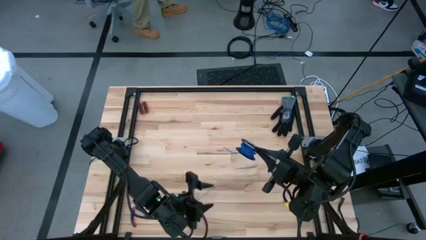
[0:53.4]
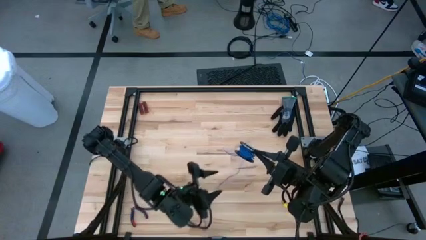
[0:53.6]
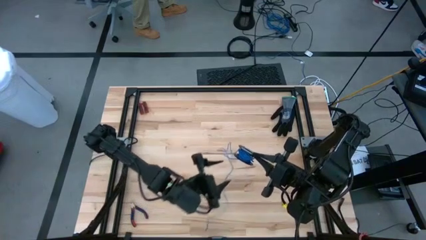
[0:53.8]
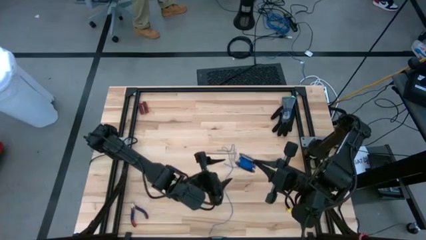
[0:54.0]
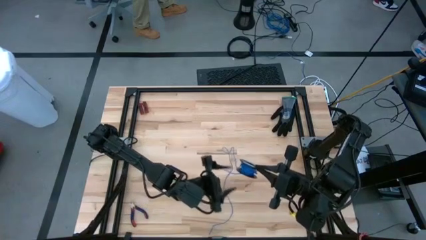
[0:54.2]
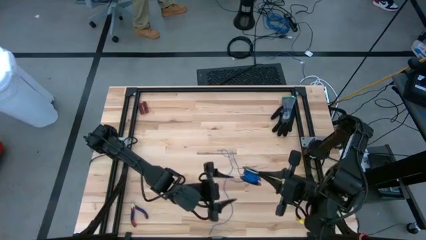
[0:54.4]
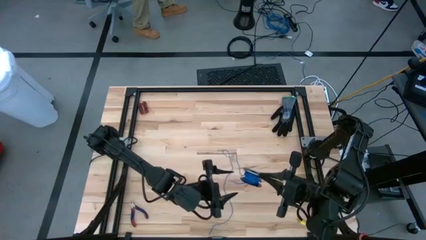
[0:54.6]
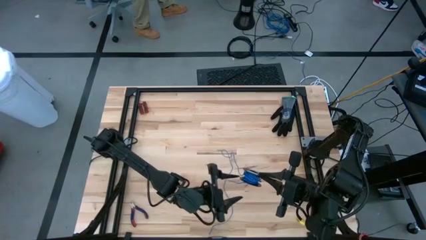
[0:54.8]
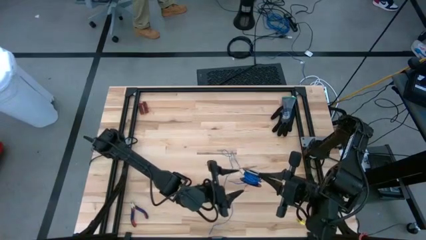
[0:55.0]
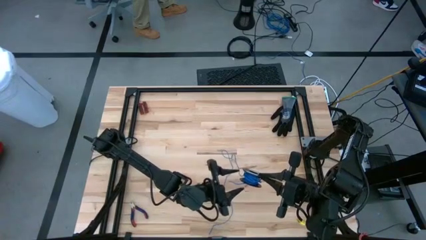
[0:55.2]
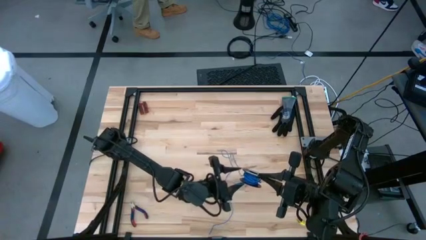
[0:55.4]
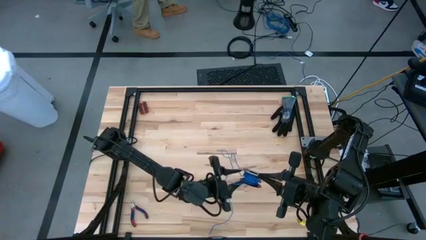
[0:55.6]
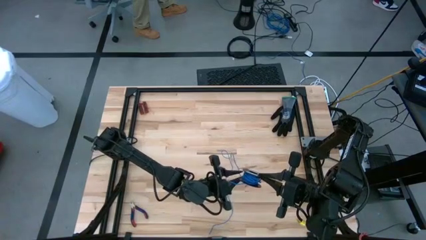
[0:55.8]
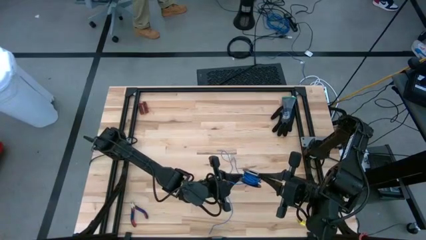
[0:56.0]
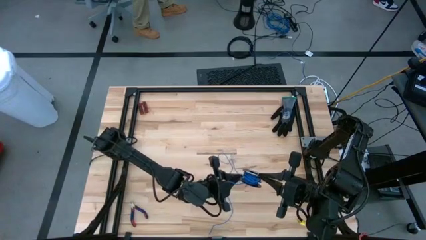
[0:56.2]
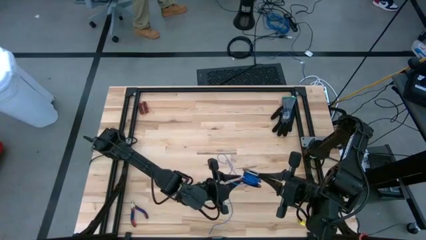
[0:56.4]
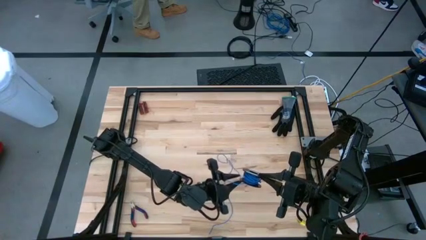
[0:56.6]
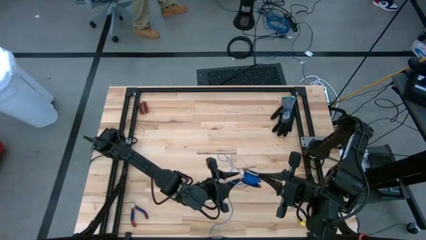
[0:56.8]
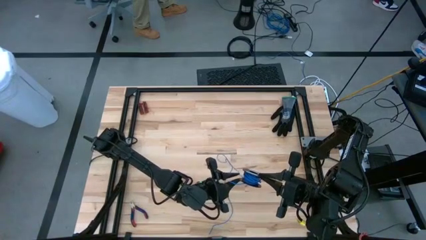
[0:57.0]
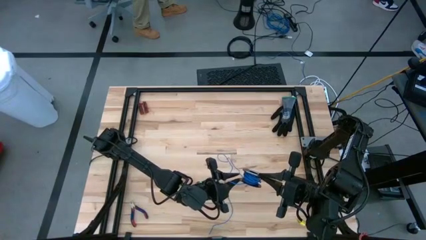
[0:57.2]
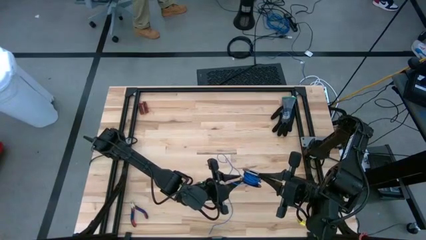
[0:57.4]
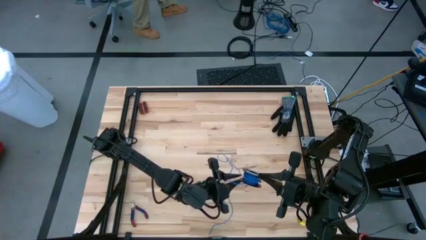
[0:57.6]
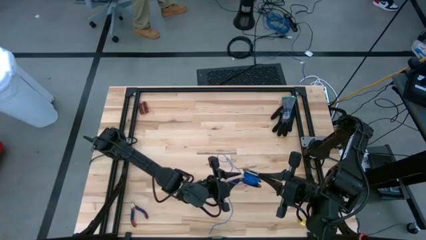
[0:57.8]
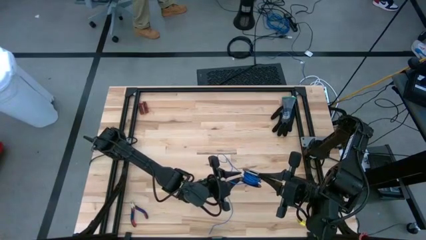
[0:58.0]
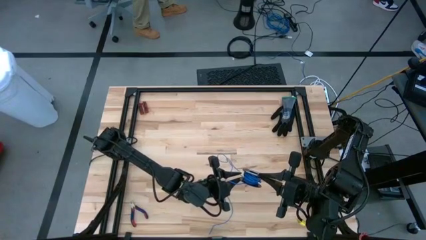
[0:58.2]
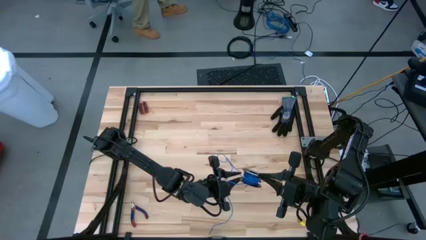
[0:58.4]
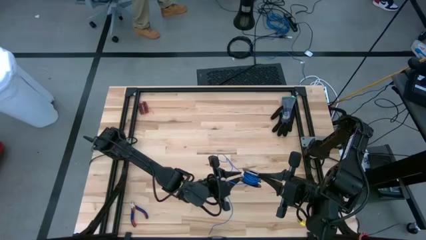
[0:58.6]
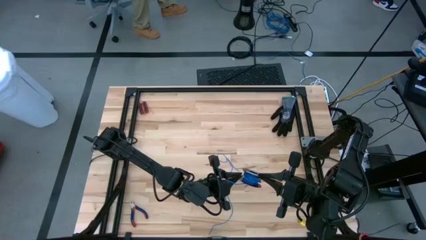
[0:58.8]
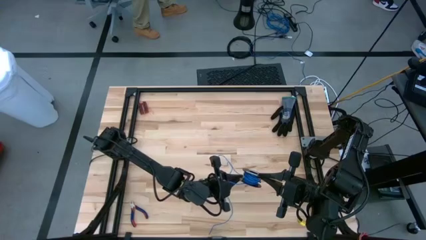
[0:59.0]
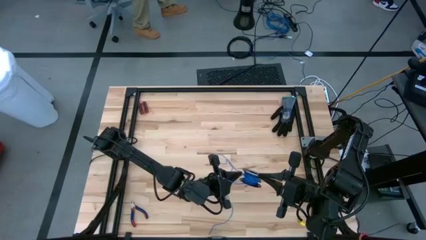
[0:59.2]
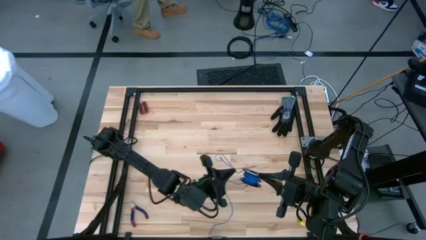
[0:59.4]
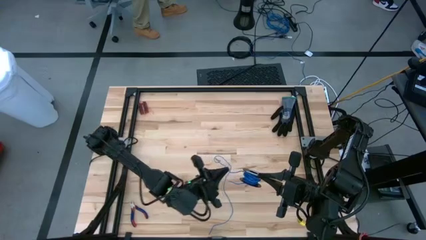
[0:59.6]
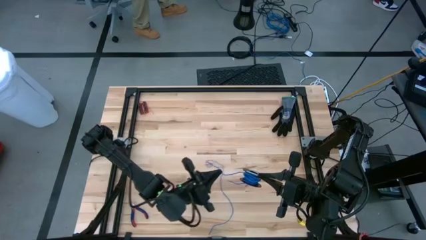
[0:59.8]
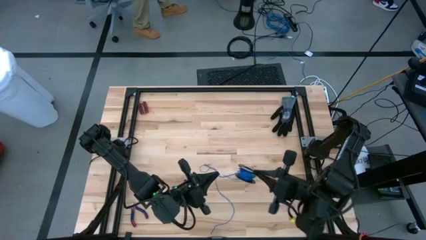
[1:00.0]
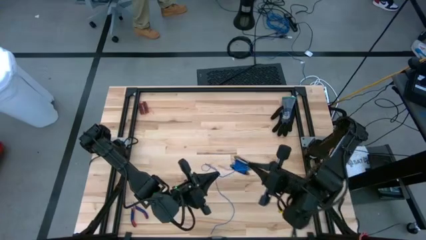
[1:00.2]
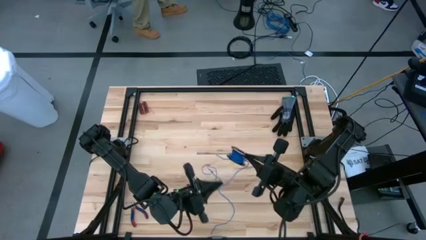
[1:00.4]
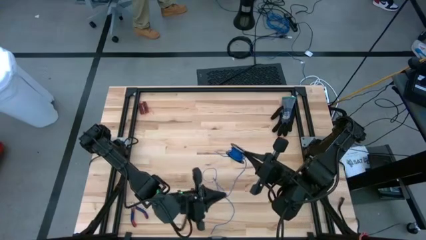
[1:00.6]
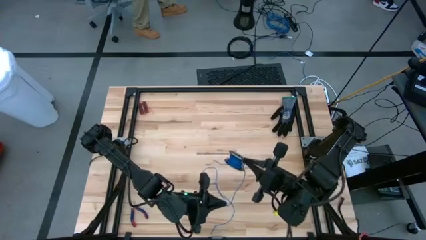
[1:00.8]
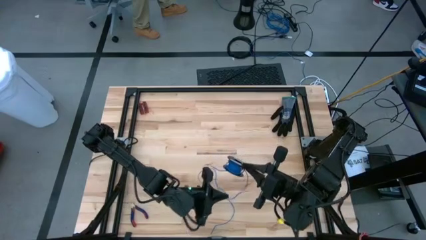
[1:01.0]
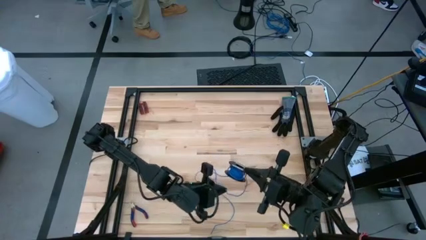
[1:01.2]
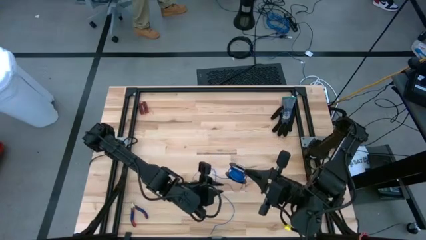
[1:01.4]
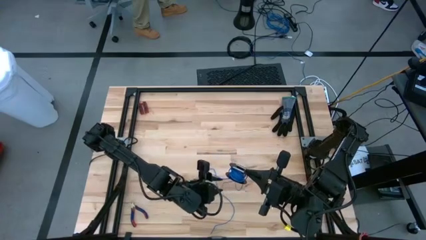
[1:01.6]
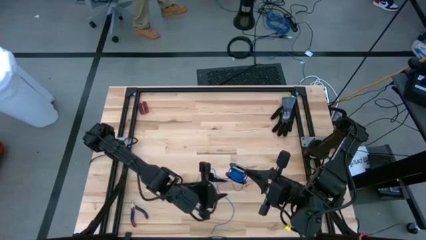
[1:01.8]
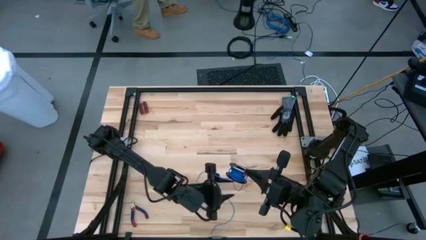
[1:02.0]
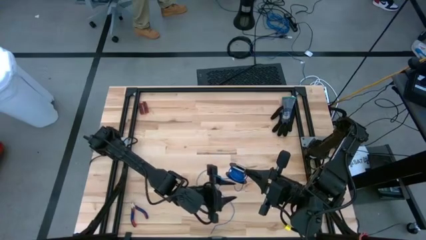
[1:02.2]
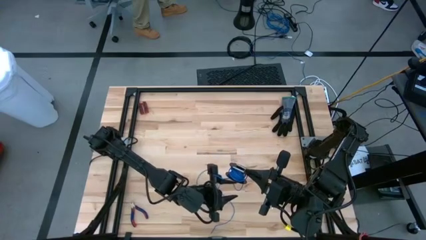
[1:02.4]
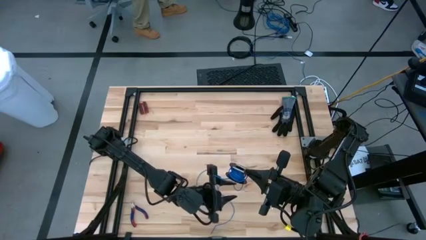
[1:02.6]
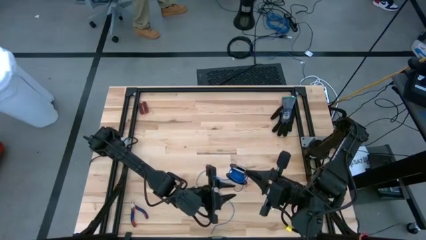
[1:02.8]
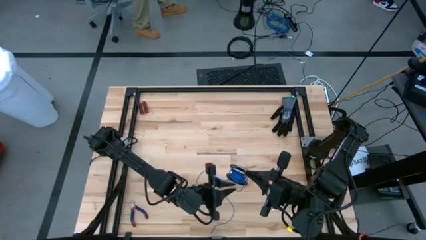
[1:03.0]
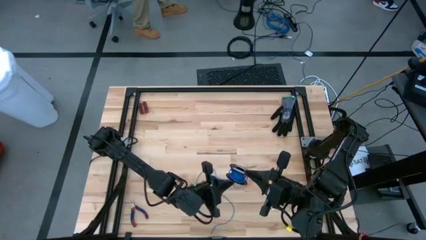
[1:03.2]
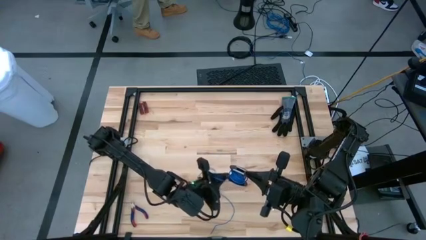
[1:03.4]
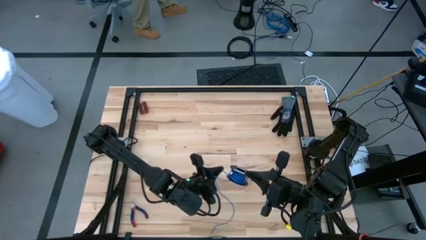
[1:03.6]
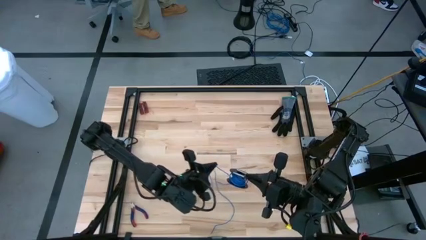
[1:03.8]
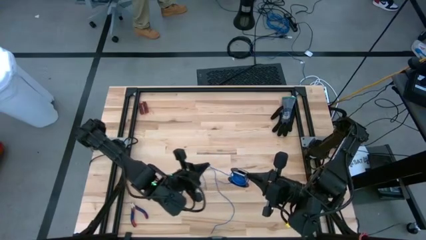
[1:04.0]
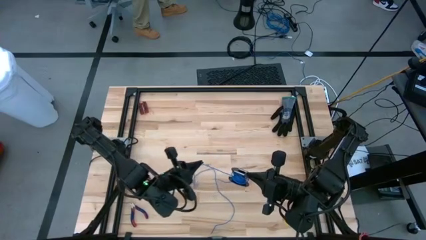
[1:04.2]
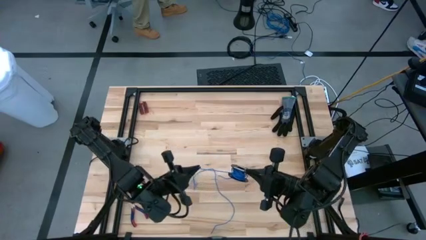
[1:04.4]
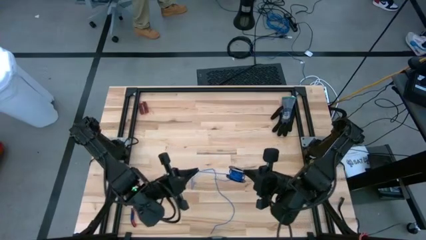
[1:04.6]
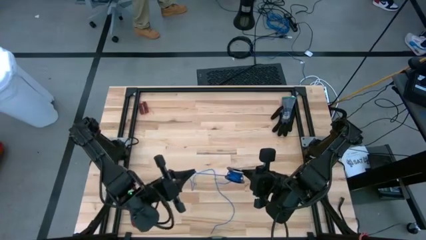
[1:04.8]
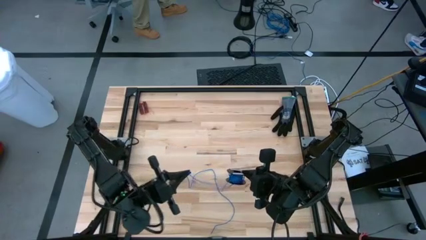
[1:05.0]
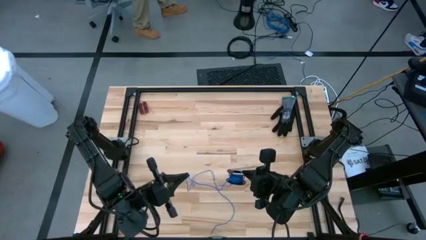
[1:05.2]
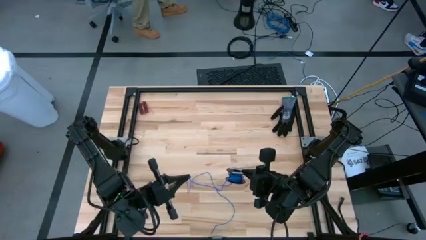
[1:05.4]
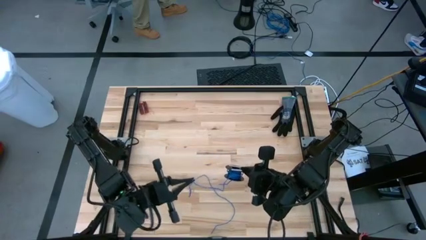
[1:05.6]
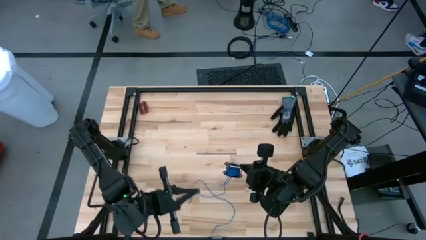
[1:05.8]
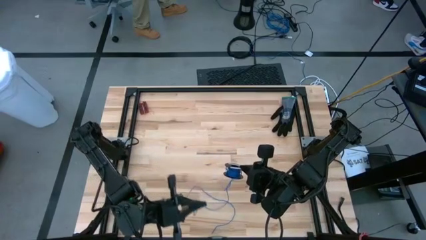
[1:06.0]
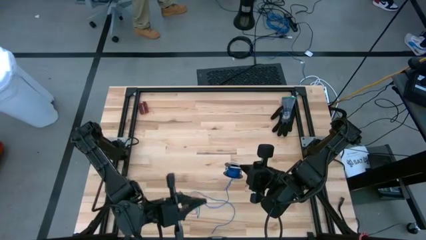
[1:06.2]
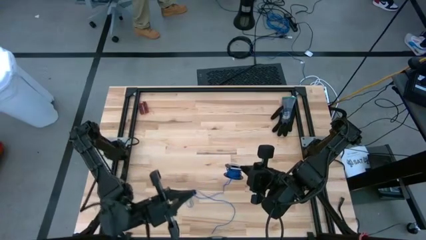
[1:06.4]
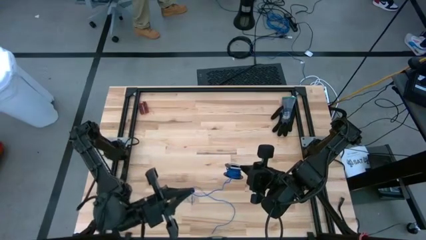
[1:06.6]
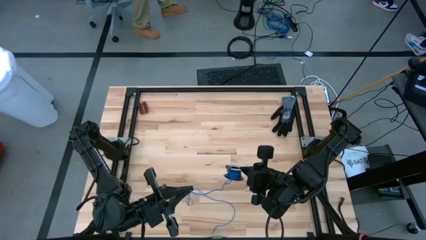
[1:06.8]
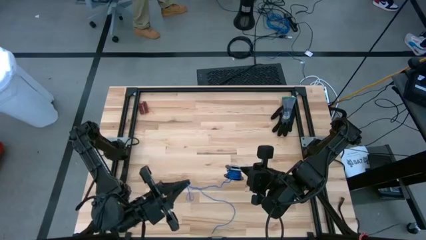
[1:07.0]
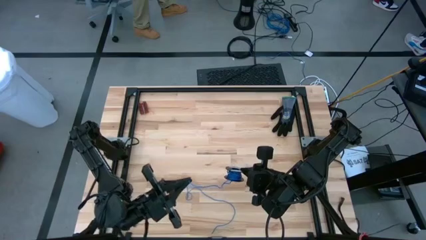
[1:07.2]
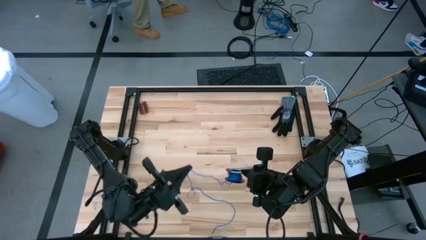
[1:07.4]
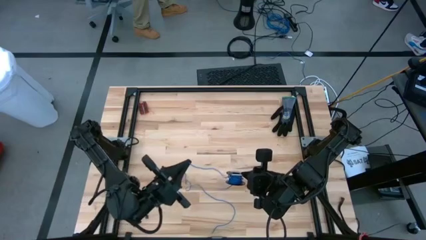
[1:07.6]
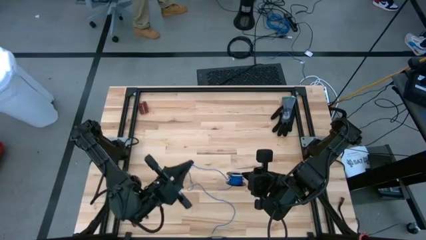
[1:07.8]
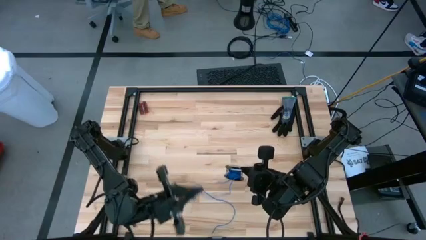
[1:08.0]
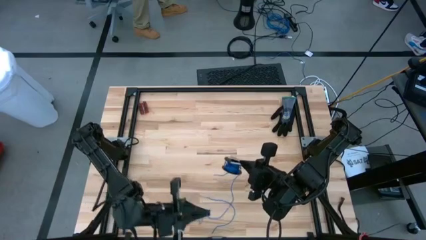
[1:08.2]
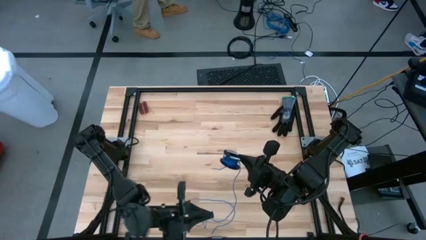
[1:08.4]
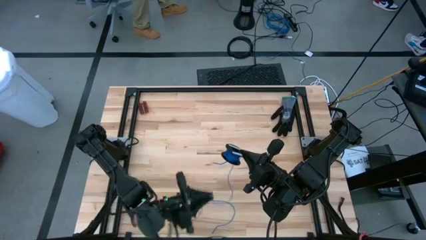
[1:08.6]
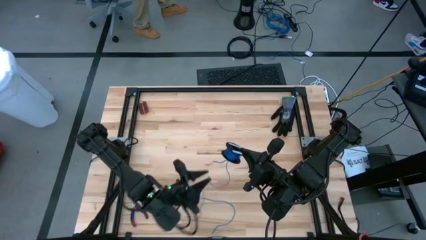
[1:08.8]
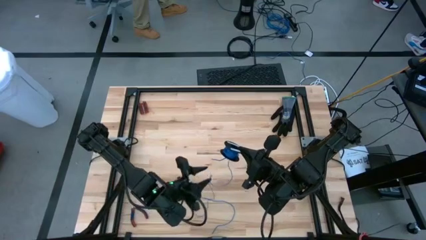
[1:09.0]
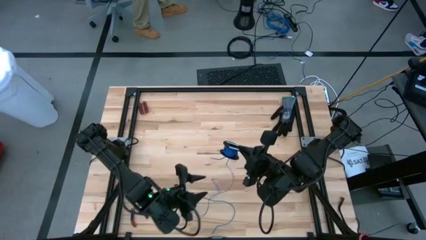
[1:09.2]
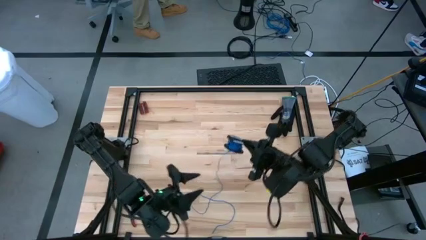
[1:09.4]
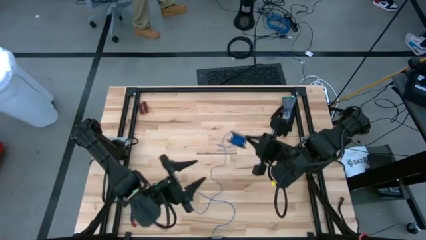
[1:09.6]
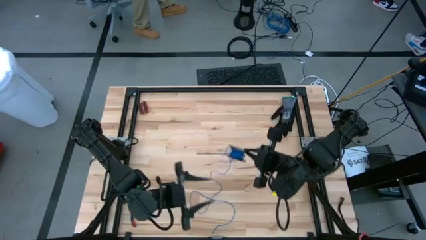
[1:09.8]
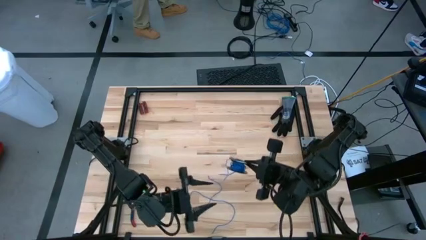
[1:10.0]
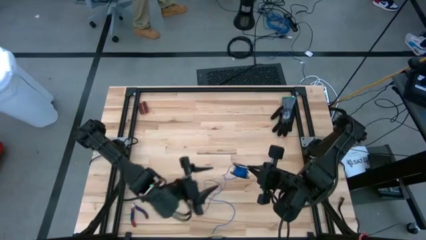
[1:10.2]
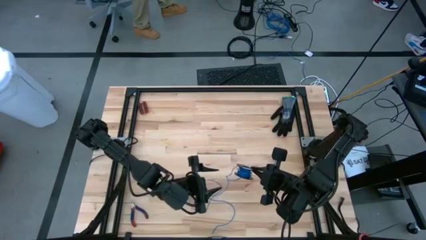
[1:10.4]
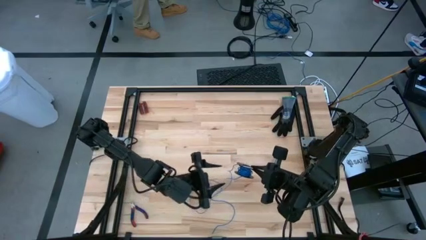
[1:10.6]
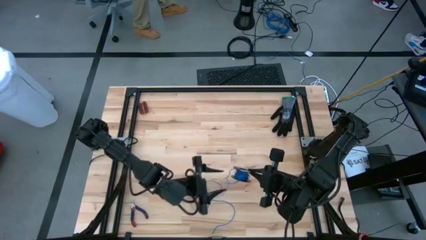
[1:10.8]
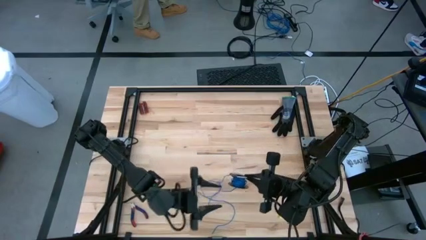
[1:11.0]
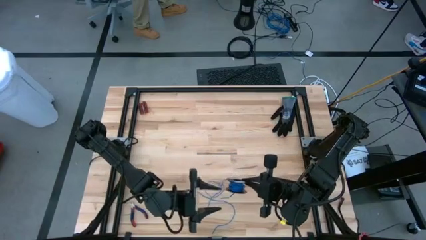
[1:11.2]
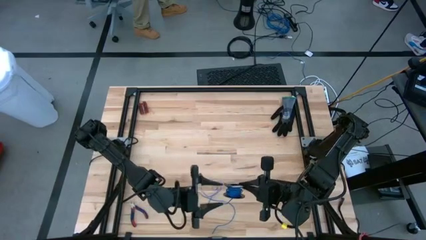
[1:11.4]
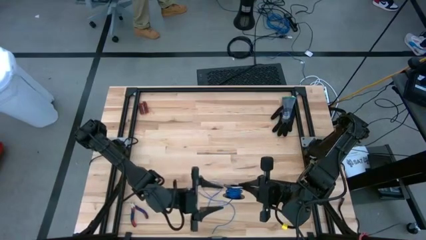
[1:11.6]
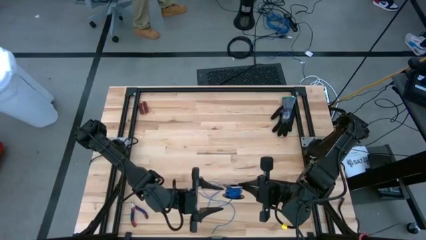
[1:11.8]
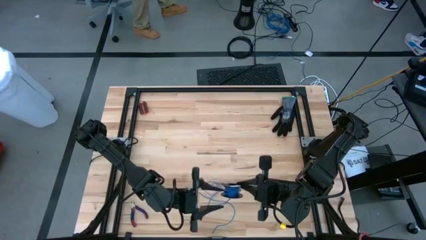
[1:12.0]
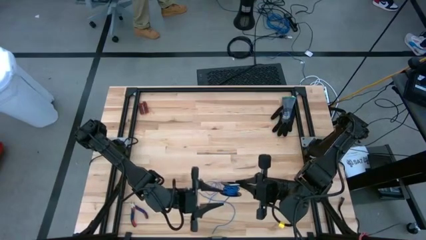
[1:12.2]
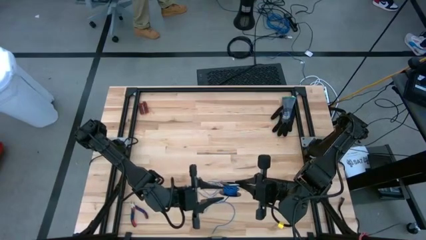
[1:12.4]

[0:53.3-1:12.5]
Task: Coil cords
Uncoil the blue wire from the spool
